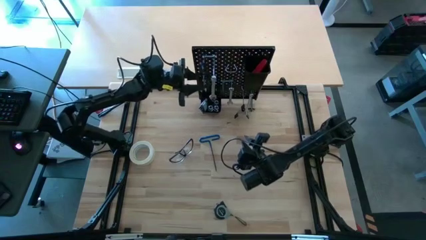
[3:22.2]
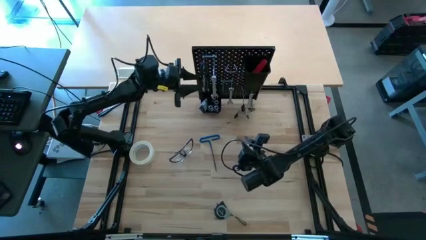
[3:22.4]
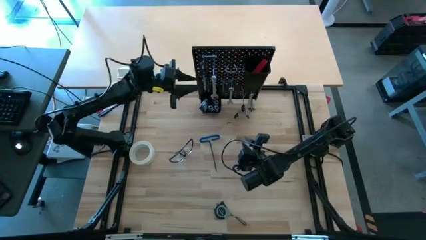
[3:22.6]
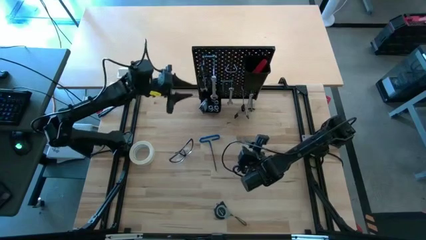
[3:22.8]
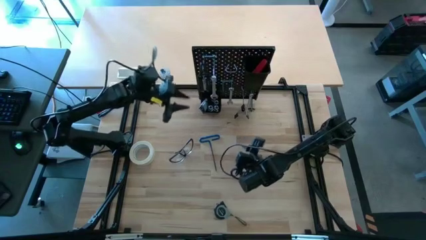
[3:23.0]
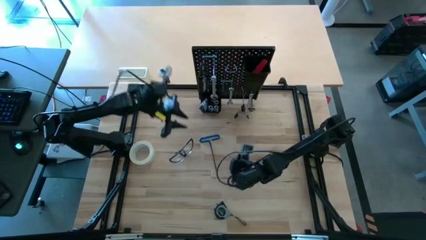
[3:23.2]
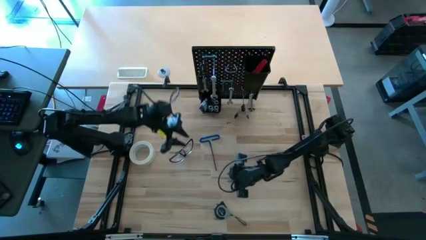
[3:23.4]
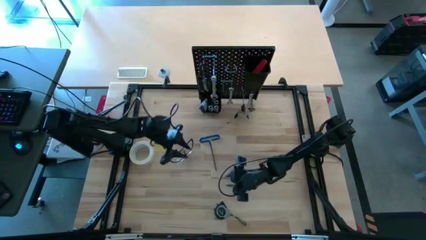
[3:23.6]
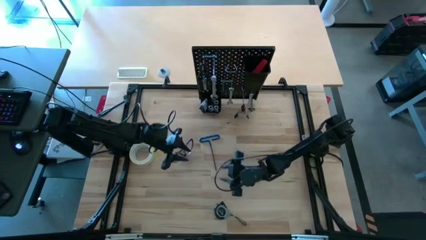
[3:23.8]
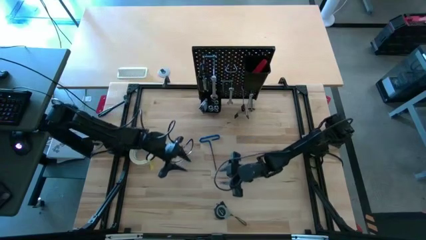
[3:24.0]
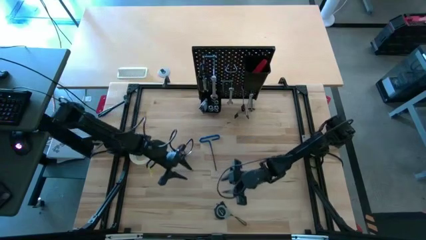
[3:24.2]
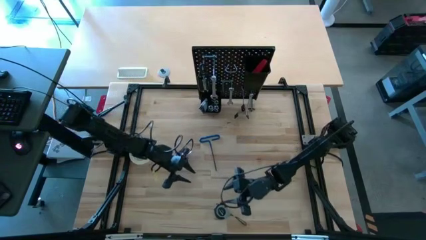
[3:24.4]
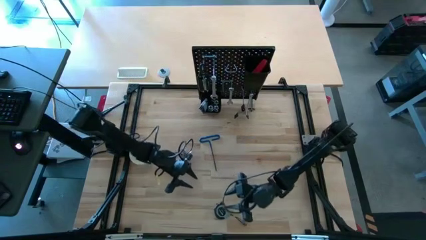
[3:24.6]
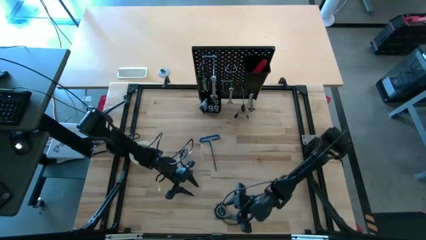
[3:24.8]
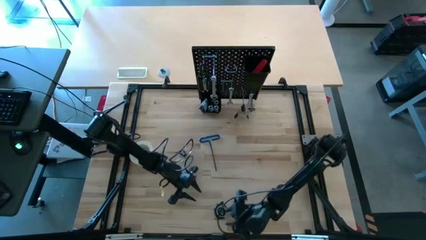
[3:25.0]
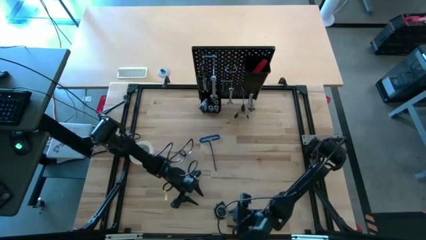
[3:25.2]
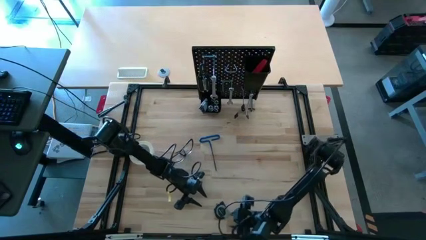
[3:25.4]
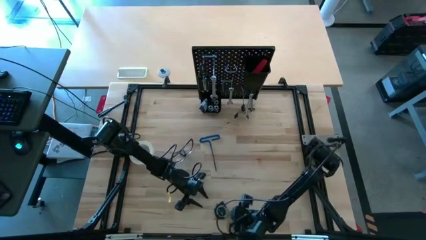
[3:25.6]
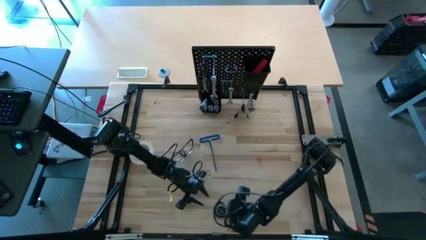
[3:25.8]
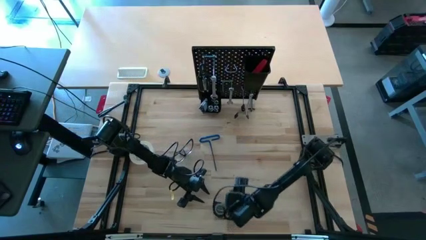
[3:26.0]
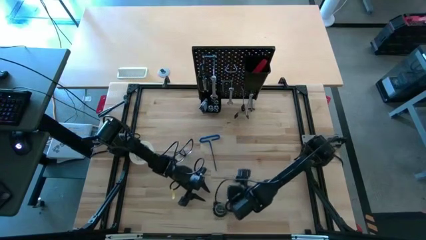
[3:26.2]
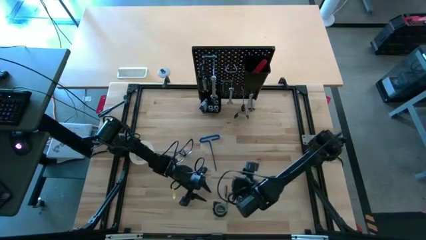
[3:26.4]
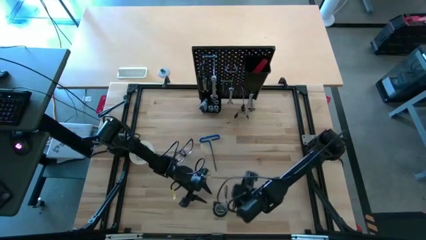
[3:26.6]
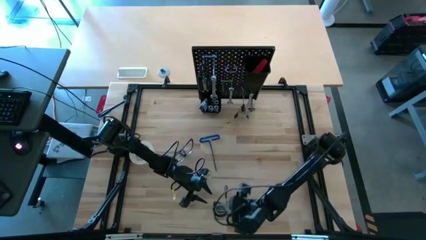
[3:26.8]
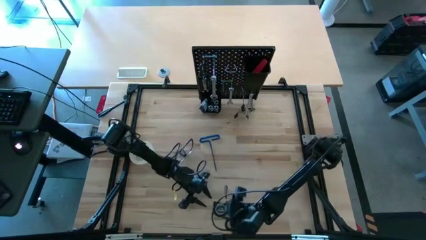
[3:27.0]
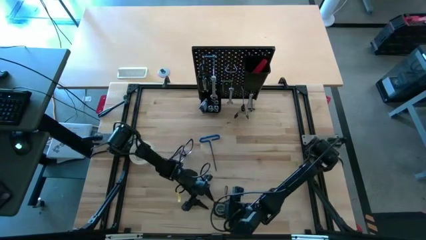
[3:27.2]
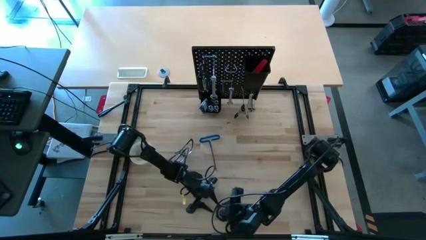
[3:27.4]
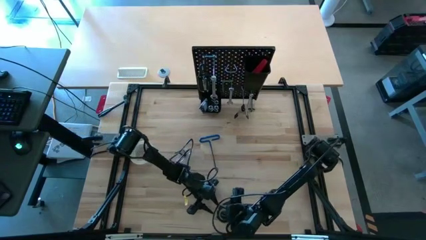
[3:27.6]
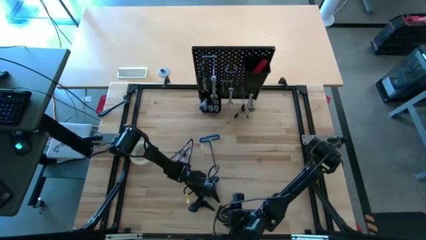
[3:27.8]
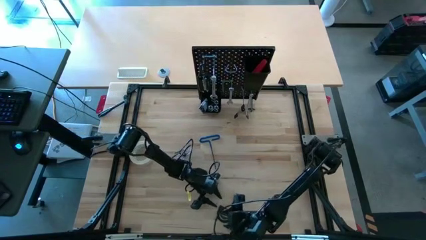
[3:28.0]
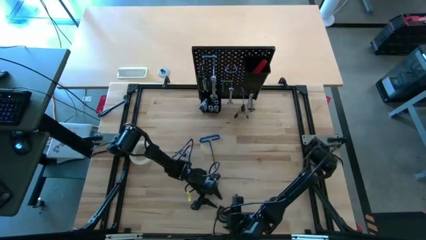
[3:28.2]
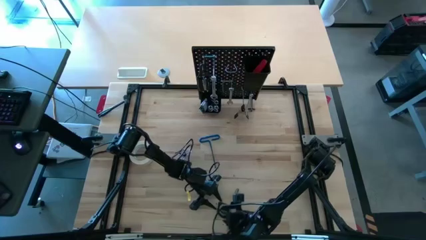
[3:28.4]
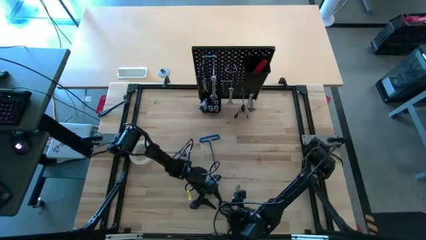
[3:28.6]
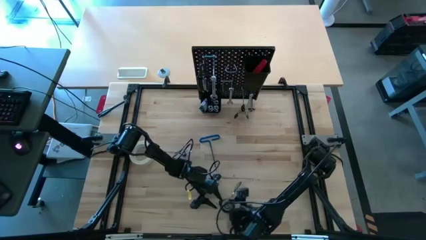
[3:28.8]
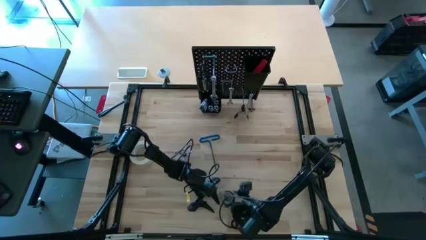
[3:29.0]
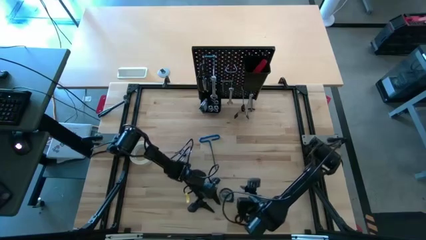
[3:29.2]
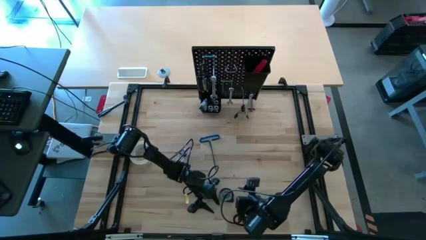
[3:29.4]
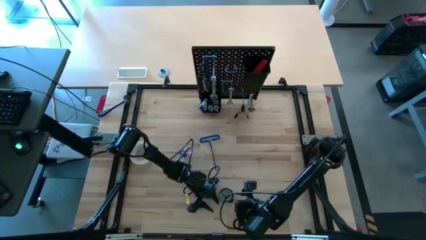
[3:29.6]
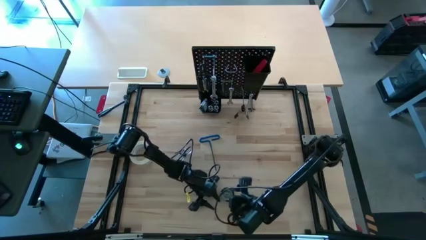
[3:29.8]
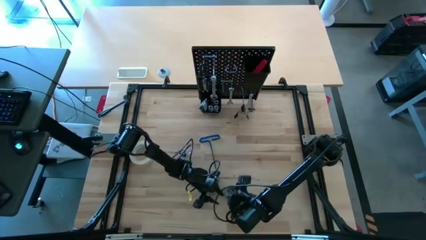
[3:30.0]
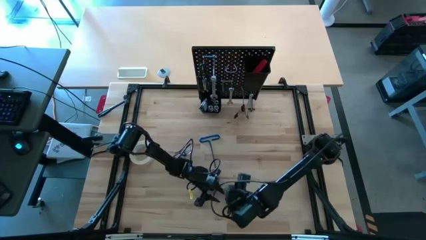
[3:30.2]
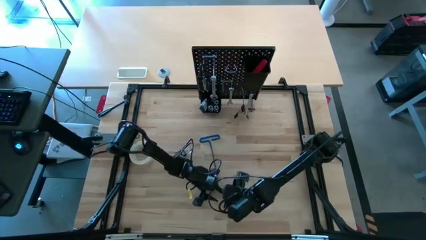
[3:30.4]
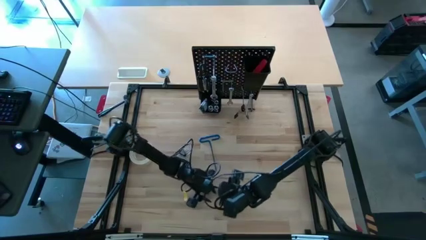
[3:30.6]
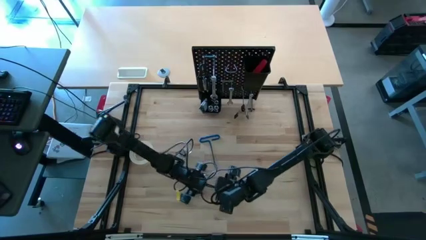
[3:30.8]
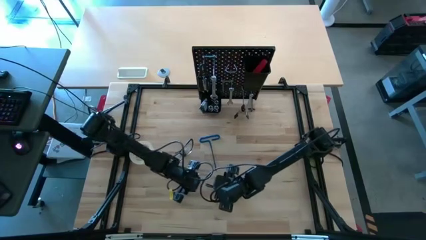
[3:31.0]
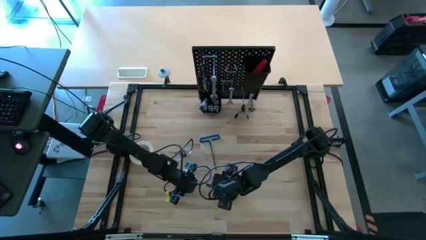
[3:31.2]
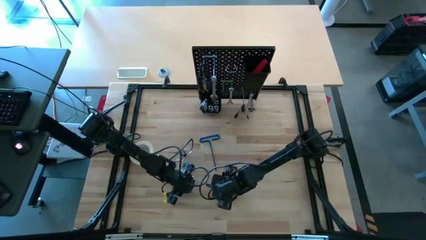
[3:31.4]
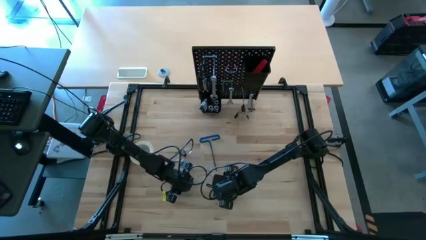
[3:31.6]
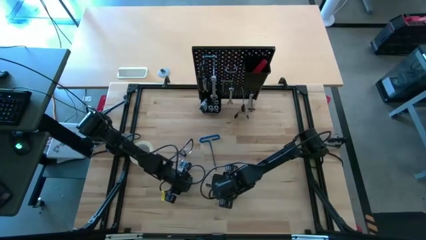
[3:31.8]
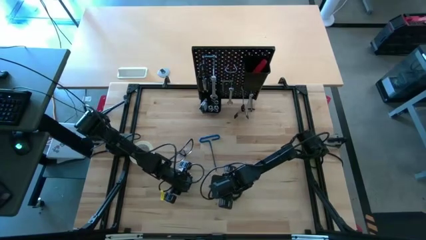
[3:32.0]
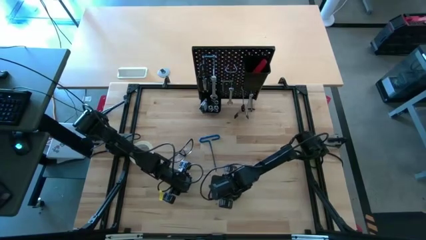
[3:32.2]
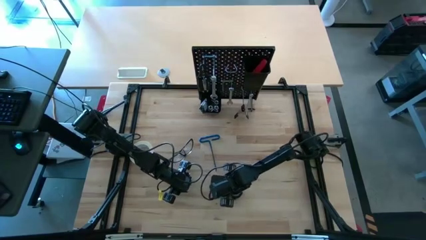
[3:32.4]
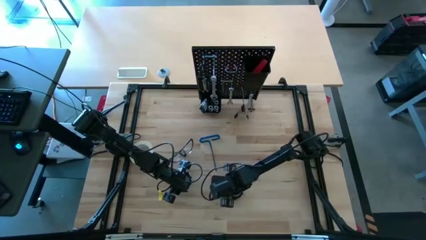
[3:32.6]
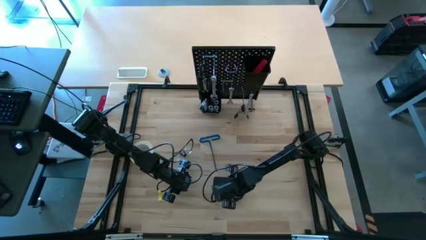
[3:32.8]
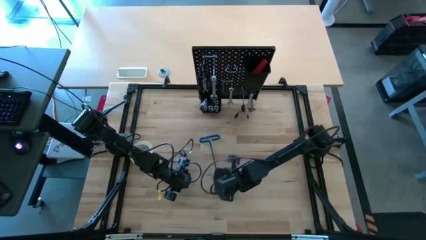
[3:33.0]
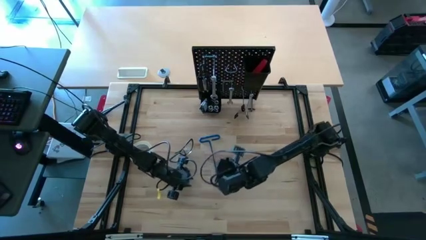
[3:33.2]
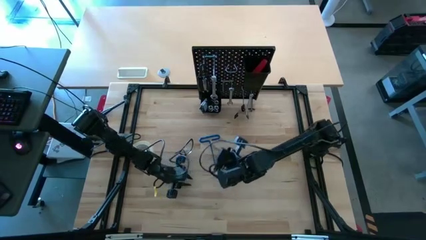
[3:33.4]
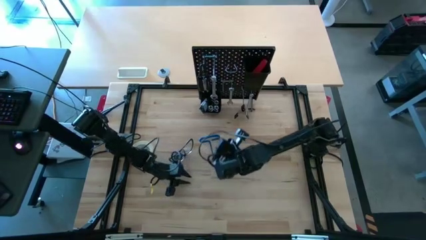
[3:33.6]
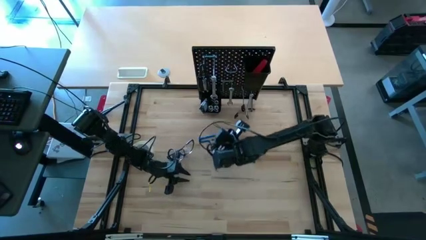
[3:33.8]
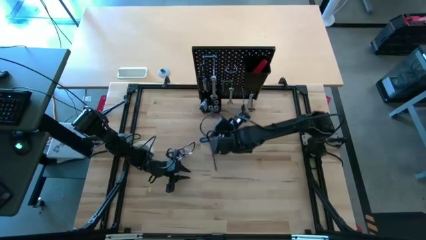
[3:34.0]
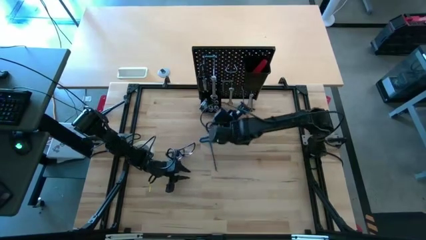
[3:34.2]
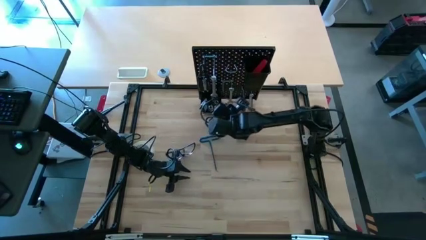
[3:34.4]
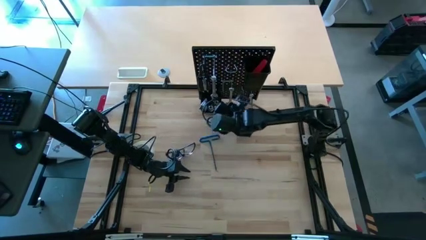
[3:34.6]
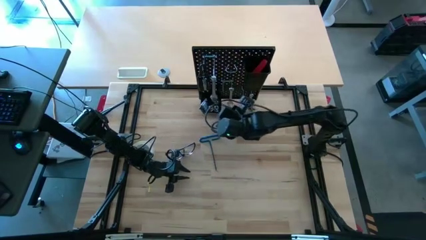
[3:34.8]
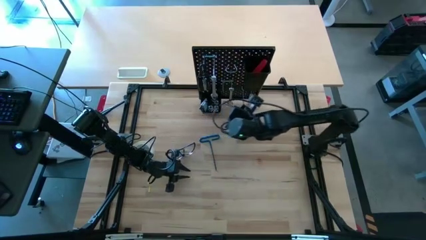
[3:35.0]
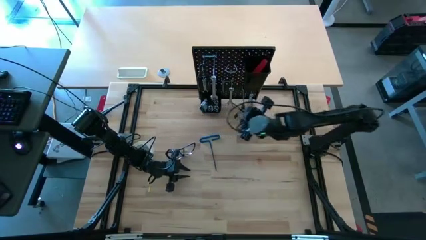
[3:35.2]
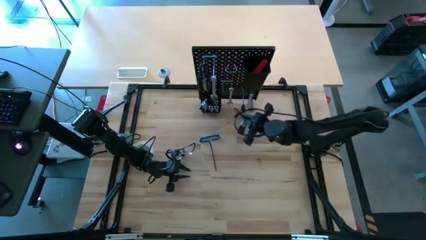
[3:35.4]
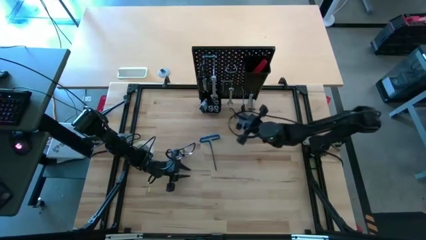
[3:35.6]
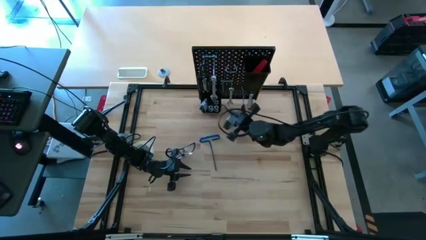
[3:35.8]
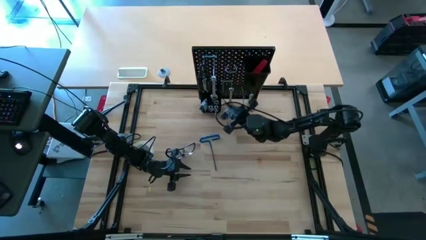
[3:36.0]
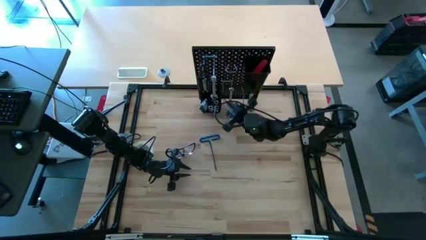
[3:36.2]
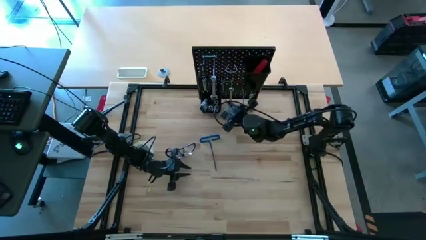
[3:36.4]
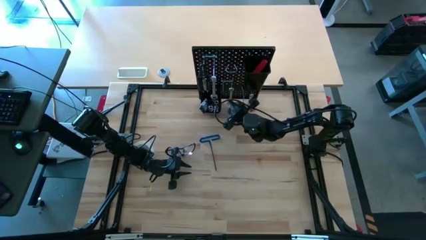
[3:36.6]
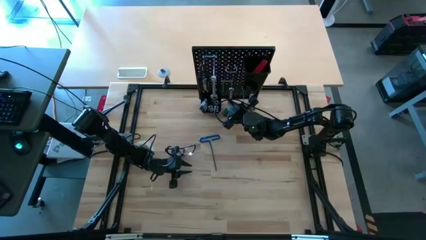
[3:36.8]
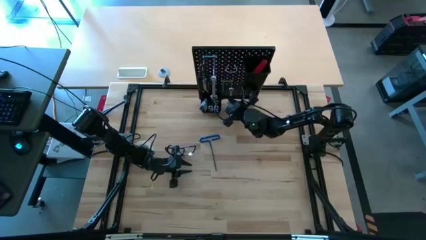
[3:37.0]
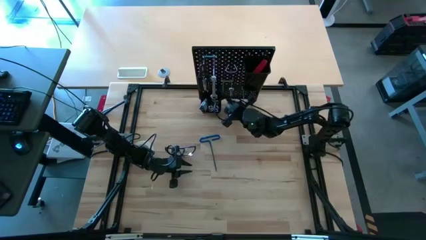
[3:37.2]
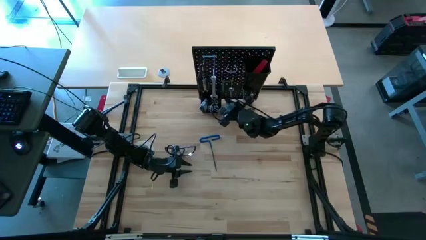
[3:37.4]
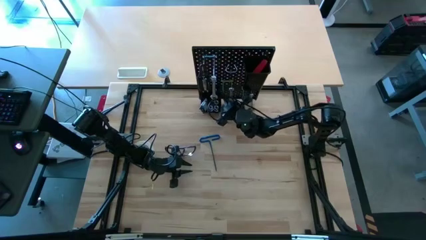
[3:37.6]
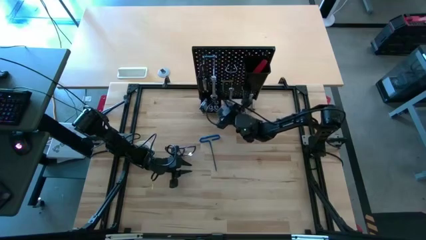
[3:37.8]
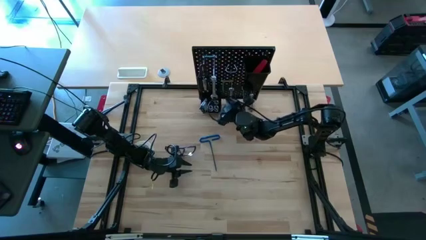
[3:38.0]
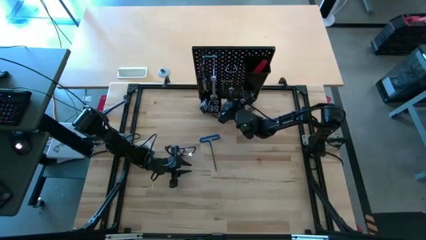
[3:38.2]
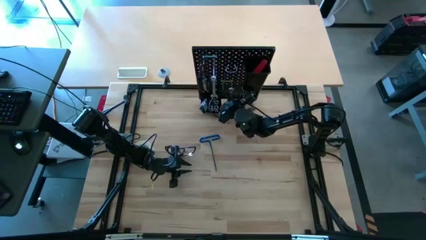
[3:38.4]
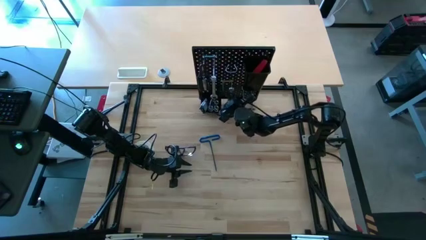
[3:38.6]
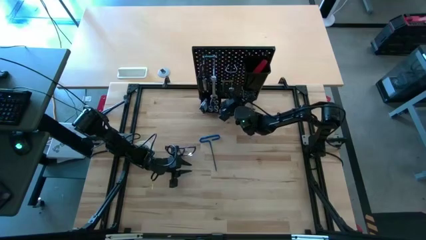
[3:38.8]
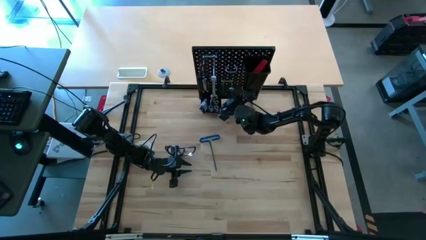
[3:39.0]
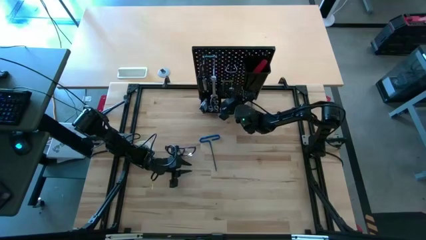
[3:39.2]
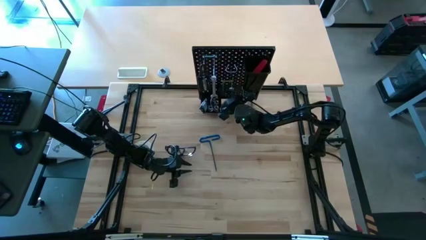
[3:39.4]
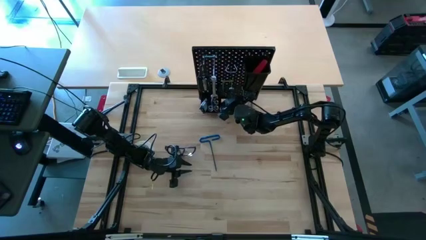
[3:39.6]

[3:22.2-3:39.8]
Task: Hang tools onto peg board
Hang the tape measure onto the peg board
